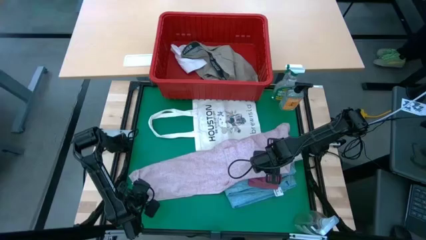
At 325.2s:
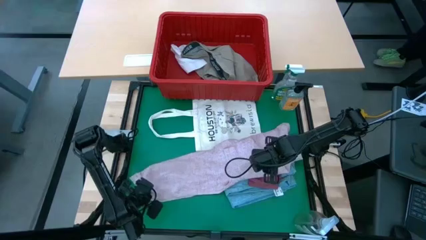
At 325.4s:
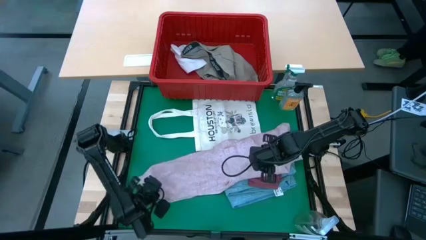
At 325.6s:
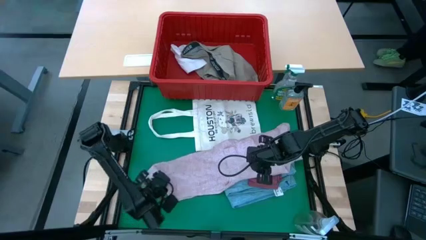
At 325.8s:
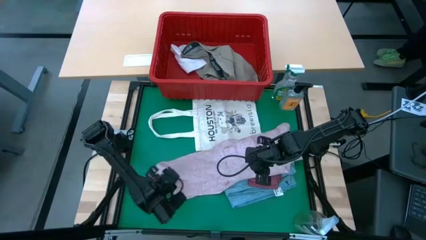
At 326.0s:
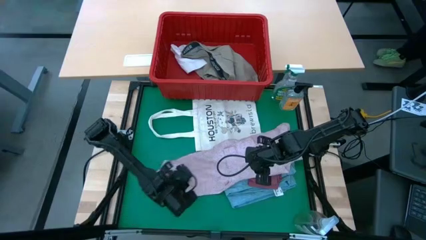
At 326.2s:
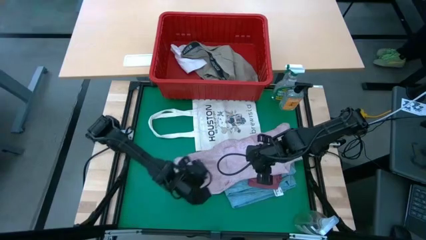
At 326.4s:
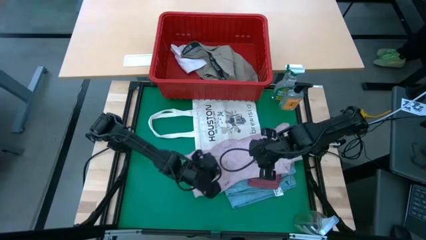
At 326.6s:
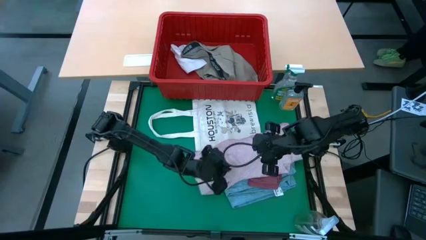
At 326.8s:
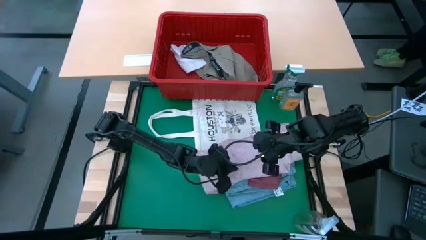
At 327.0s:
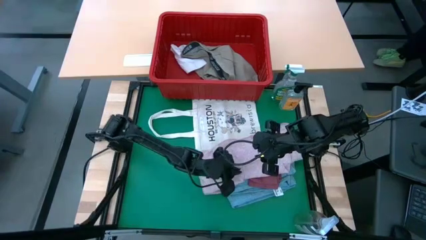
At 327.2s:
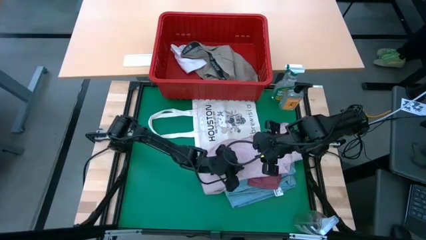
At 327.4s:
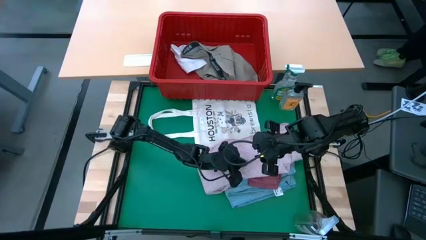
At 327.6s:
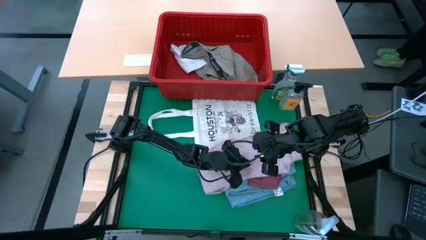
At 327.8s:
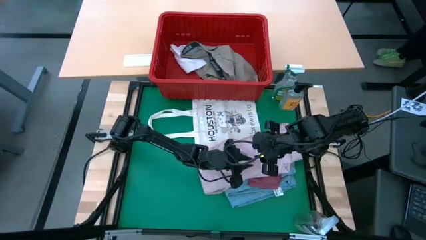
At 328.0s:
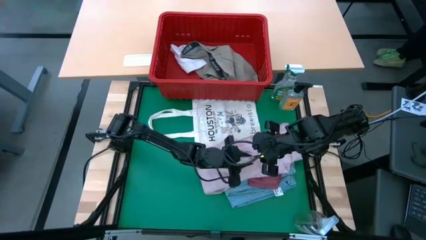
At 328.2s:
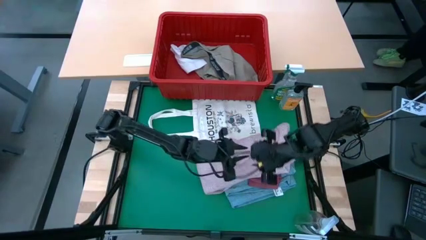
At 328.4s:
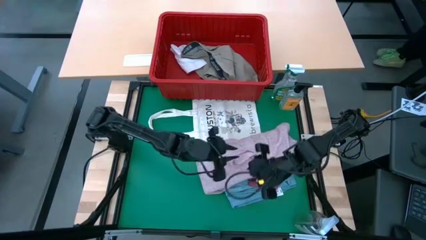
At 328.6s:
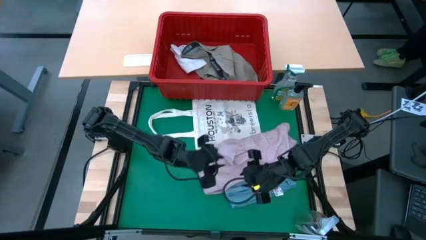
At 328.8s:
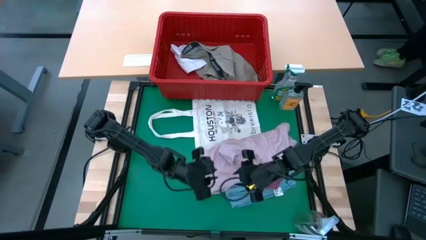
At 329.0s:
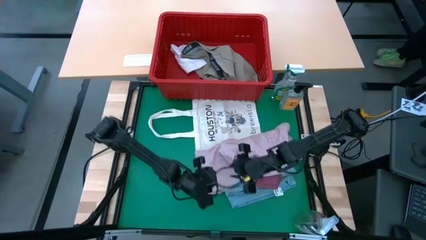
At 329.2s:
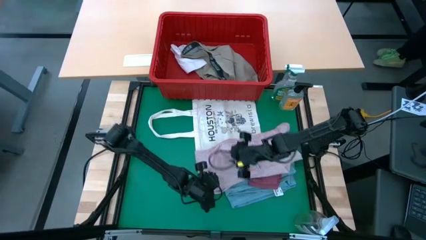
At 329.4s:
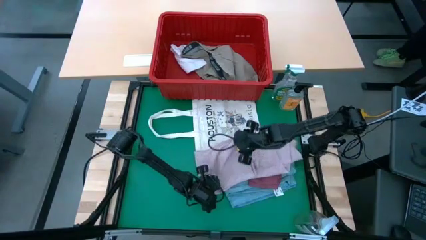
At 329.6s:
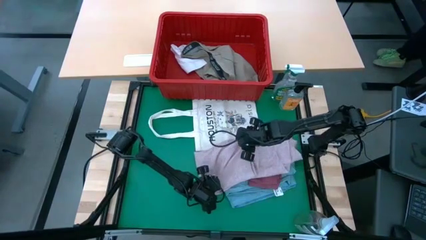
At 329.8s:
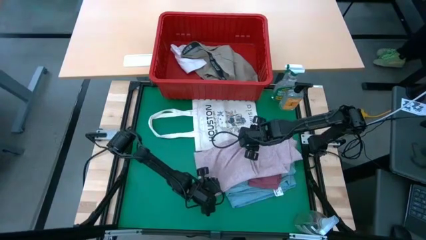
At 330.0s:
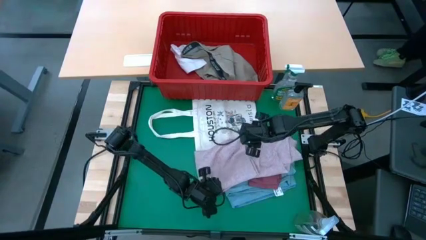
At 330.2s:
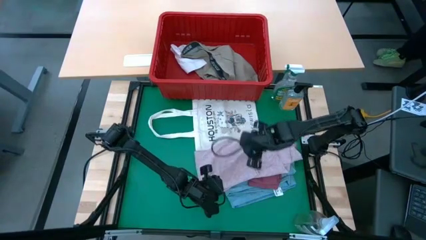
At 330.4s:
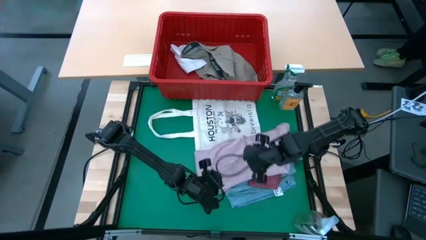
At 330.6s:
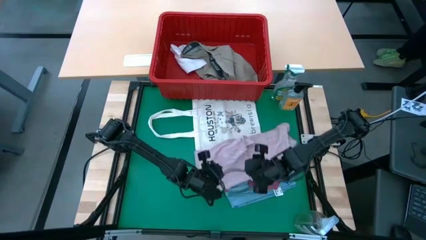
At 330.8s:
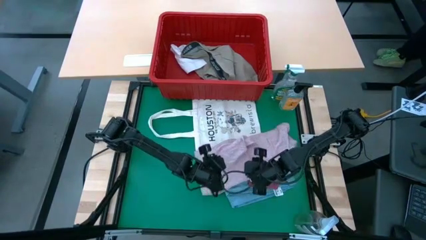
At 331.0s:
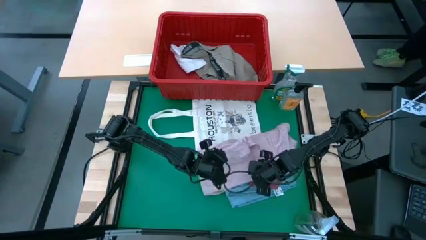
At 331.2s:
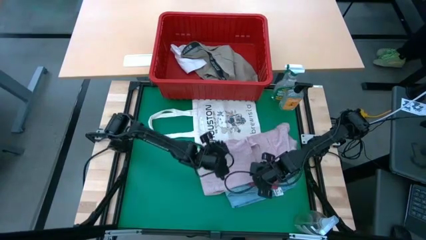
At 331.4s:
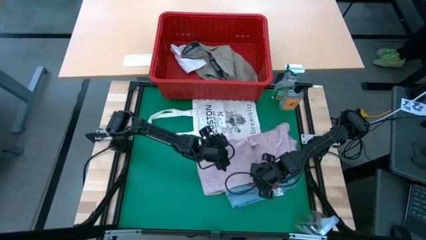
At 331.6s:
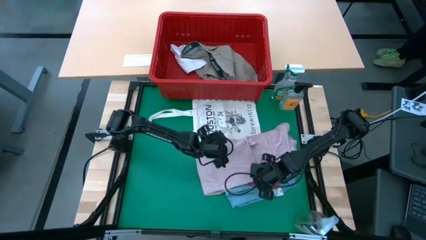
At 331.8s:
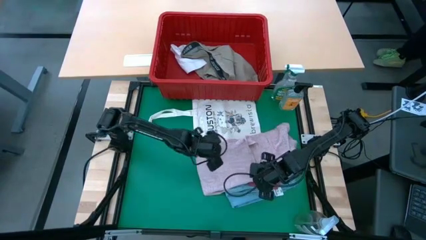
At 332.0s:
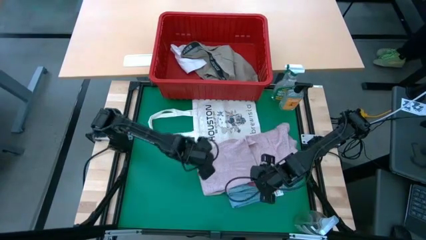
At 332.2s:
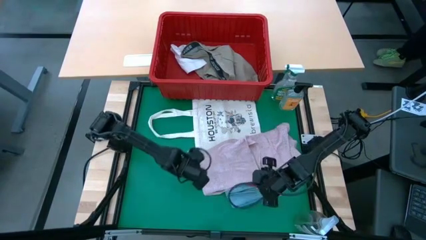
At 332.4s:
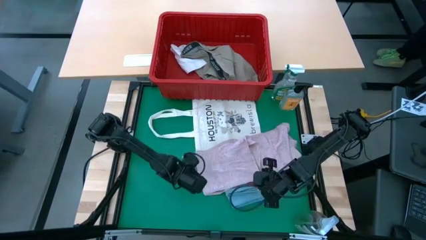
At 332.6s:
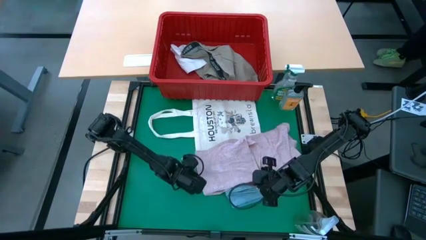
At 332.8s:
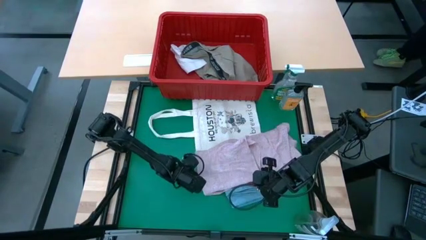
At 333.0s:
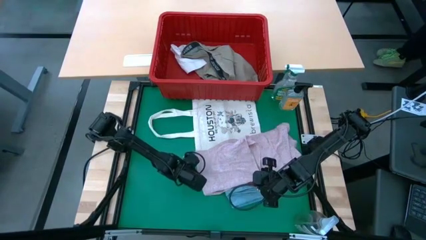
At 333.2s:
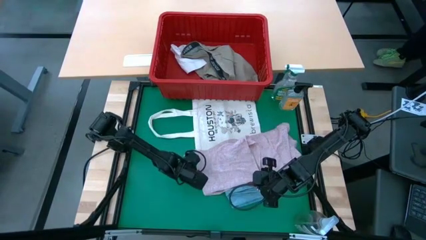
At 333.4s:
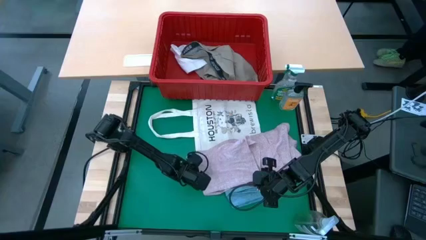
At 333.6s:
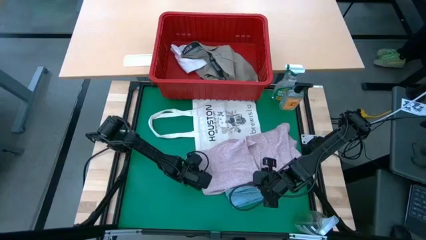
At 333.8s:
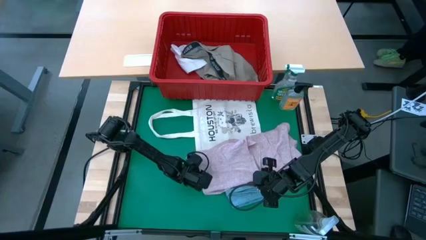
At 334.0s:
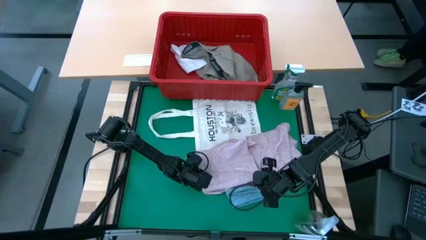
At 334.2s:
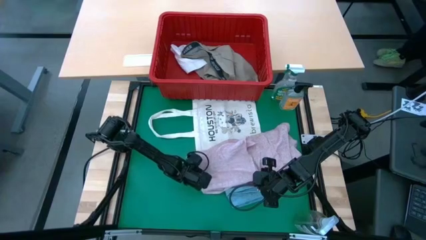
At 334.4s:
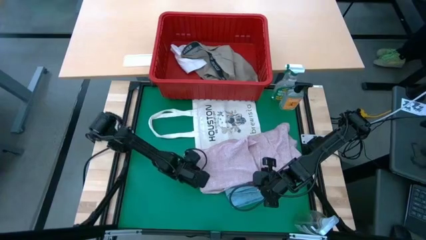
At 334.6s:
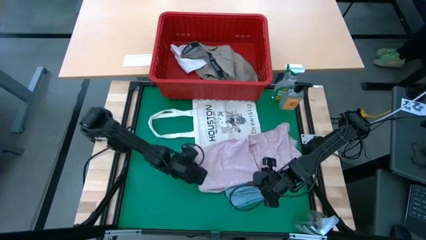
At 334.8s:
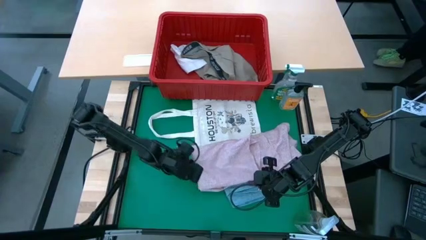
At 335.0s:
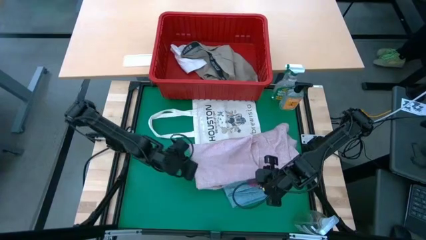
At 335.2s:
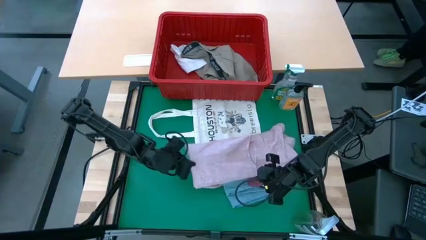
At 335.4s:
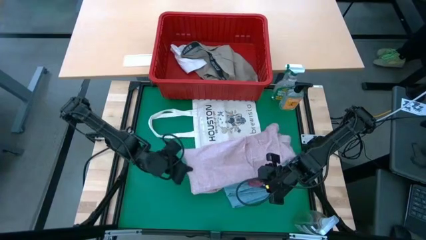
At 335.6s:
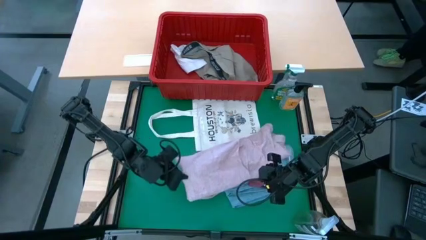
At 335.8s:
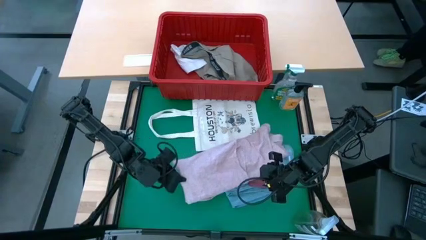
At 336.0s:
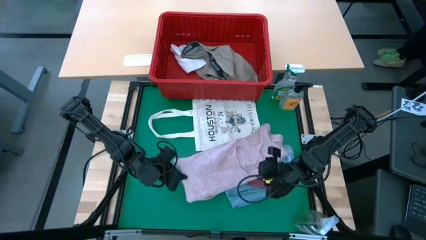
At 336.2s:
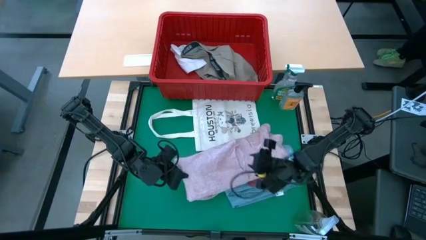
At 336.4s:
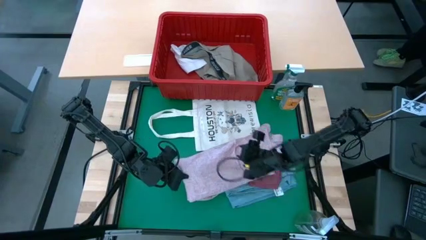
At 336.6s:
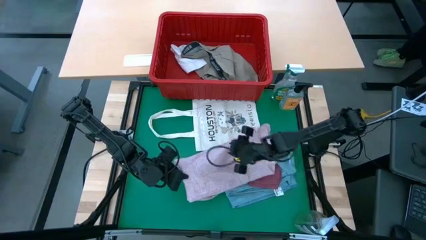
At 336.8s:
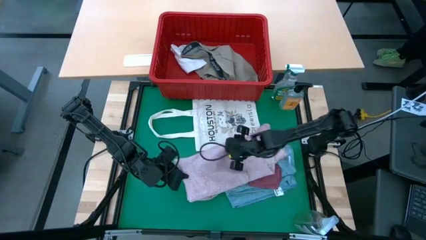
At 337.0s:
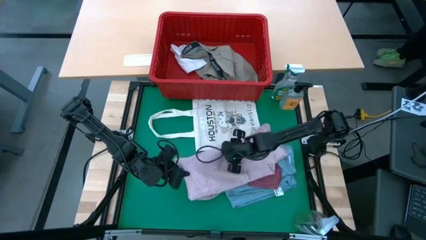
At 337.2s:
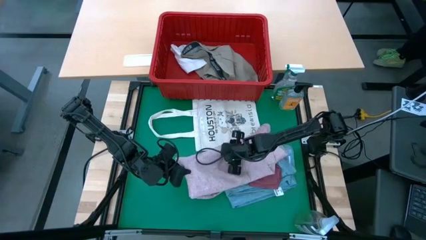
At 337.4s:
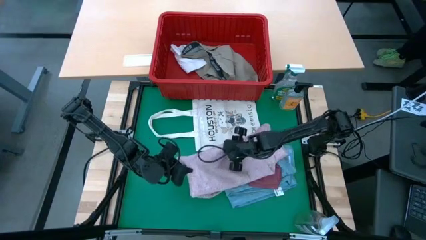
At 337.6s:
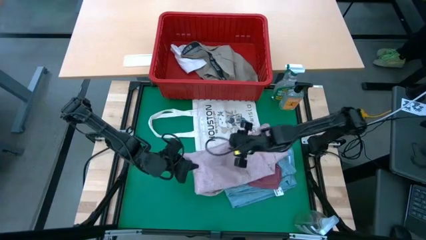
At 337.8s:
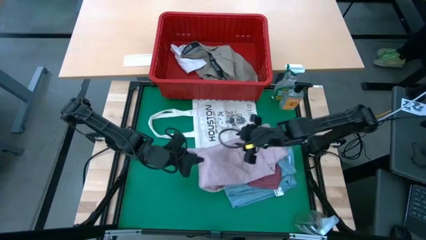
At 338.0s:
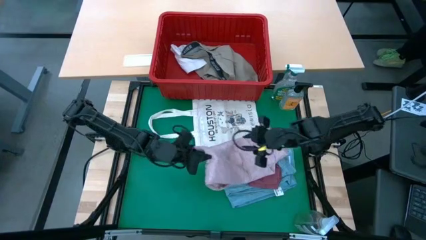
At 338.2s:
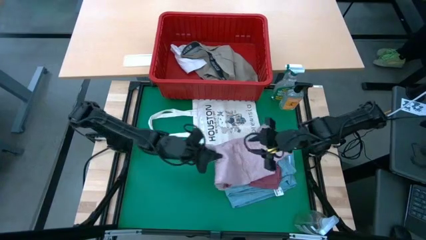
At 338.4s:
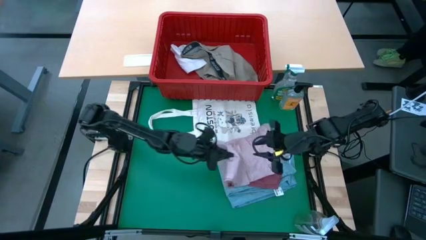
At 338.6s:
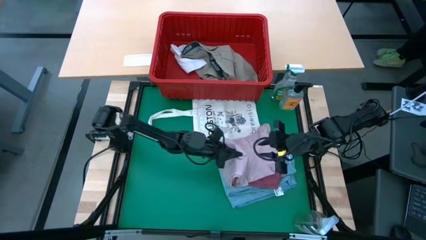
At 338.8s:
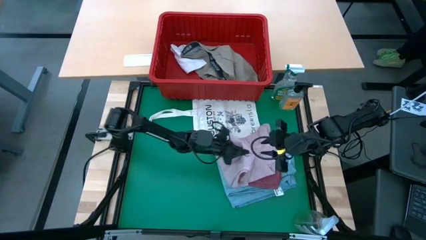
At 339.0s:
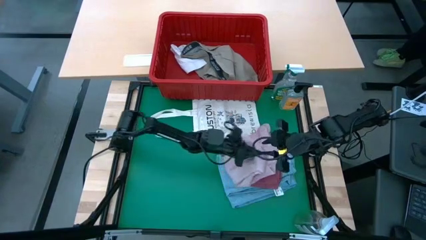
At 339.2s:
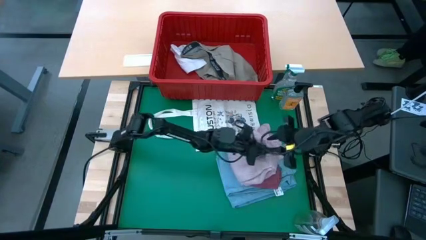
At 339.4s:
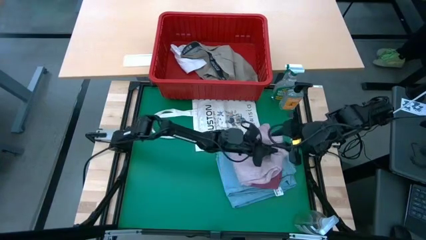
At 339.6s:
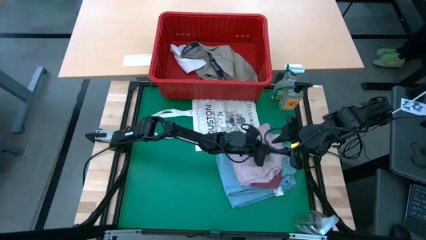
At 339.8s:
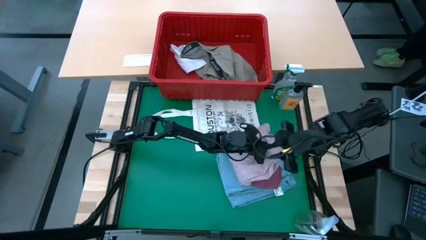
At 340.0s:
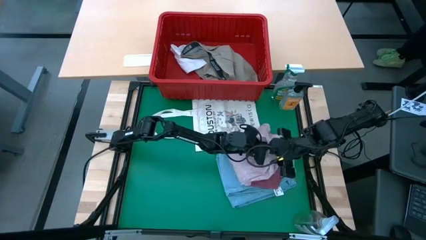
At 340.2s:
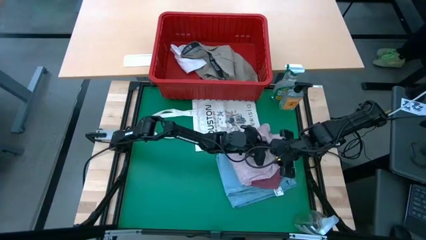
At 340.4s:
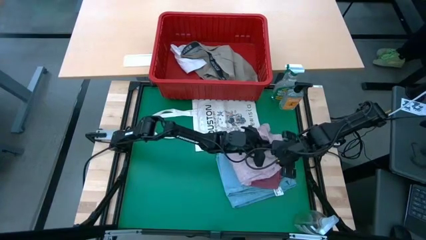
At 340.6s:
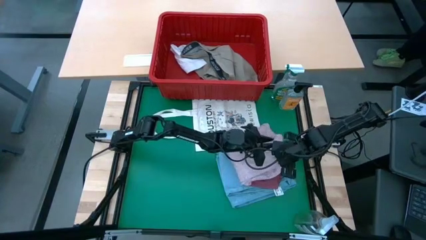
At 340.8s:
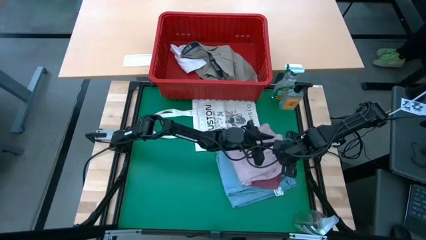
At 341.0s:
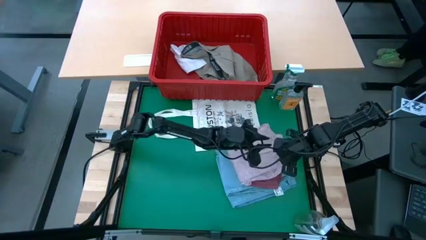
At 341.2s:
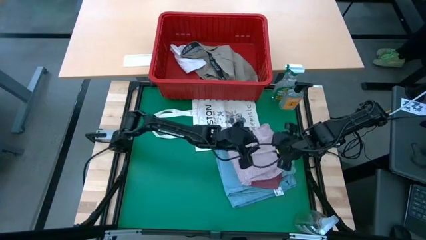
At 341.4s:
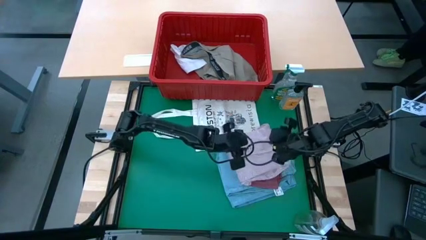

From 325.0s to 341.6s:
Task: Fold Laundry from Bin
Fold the pink shirt from the red laundry basket
